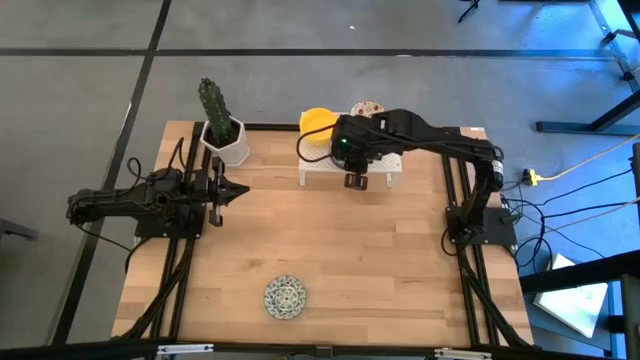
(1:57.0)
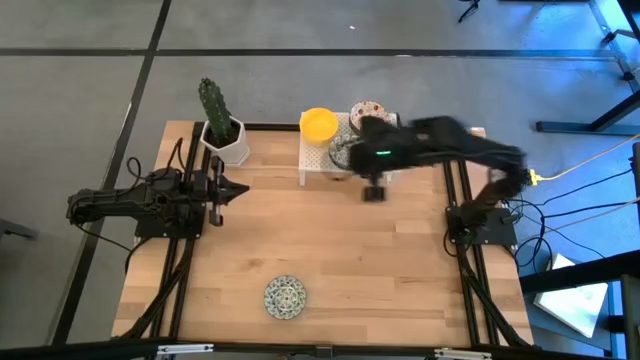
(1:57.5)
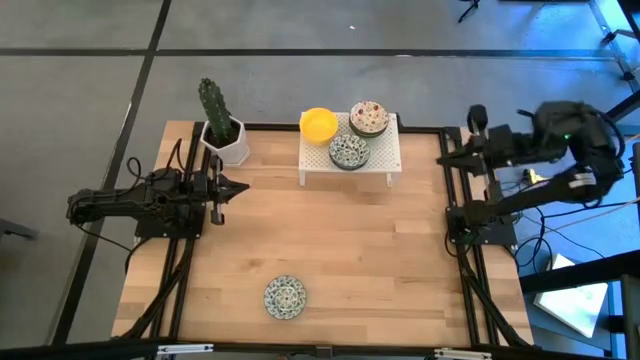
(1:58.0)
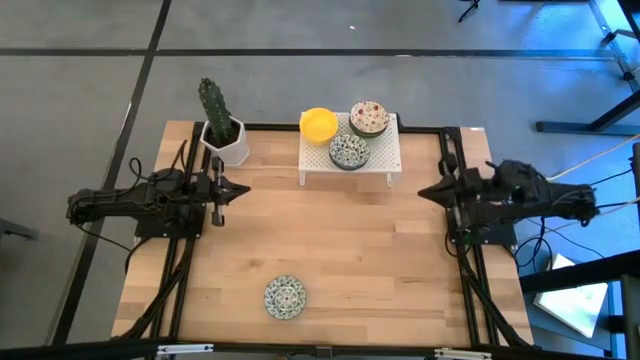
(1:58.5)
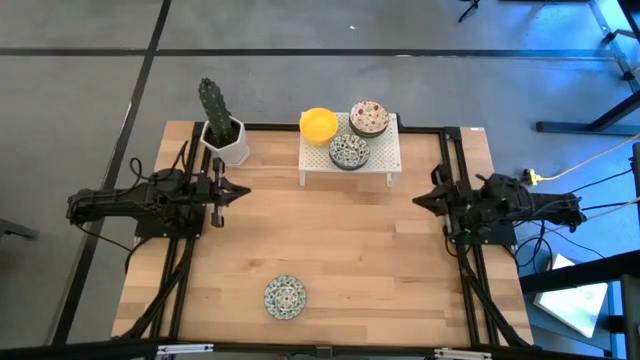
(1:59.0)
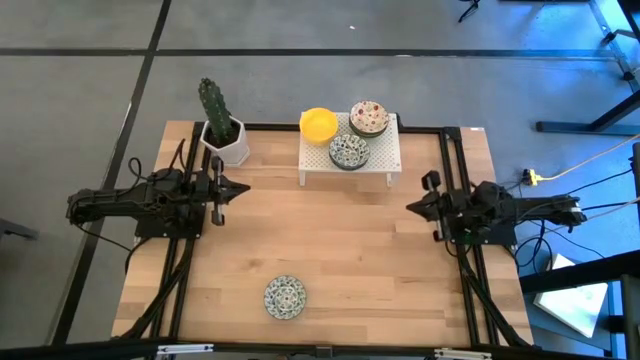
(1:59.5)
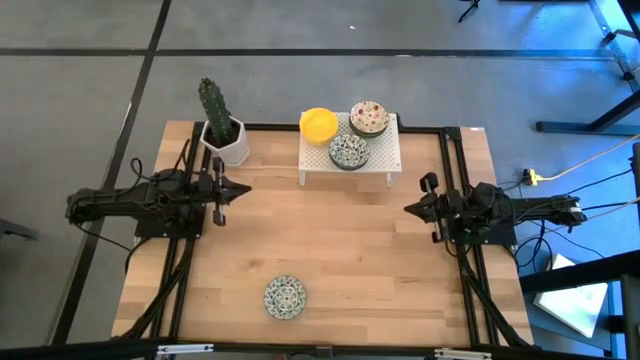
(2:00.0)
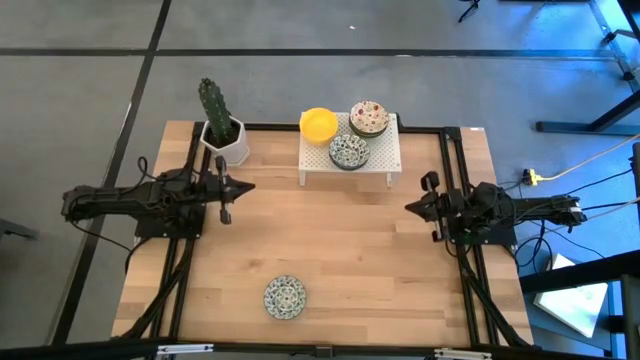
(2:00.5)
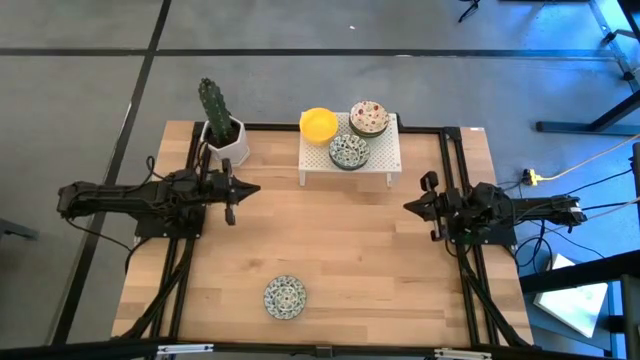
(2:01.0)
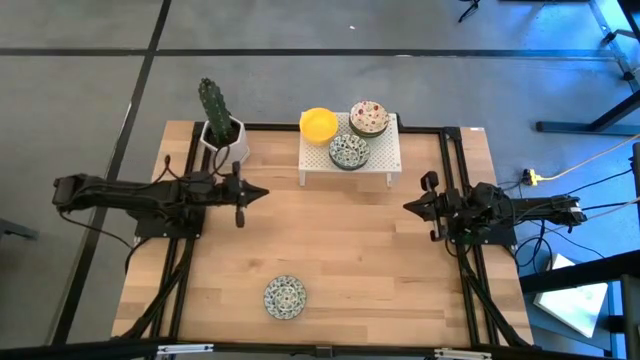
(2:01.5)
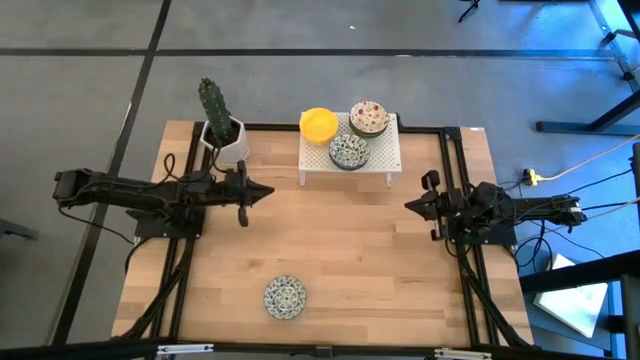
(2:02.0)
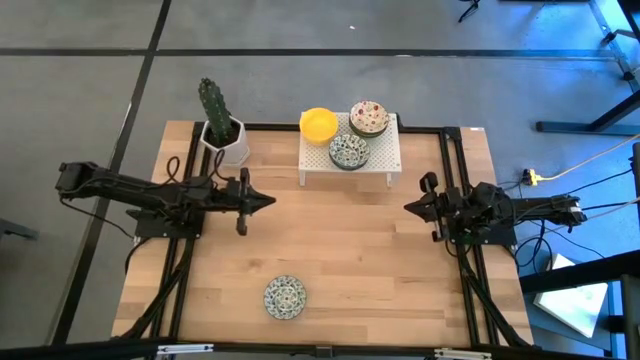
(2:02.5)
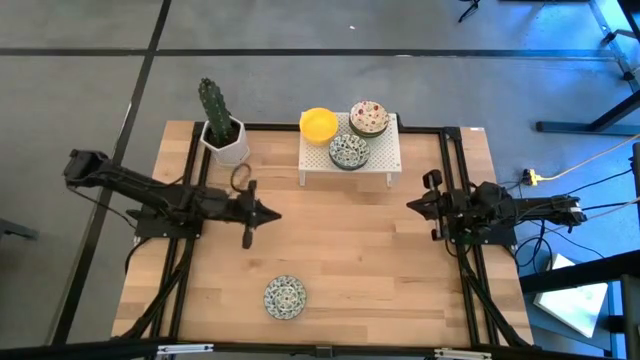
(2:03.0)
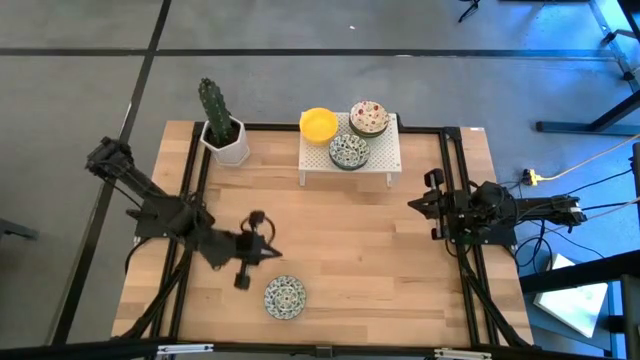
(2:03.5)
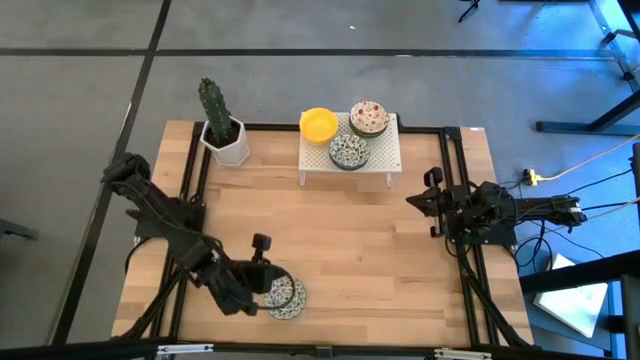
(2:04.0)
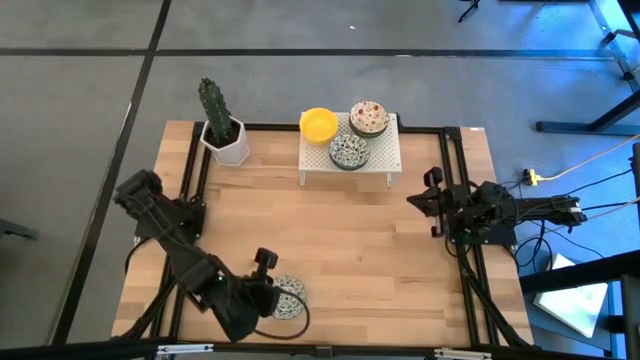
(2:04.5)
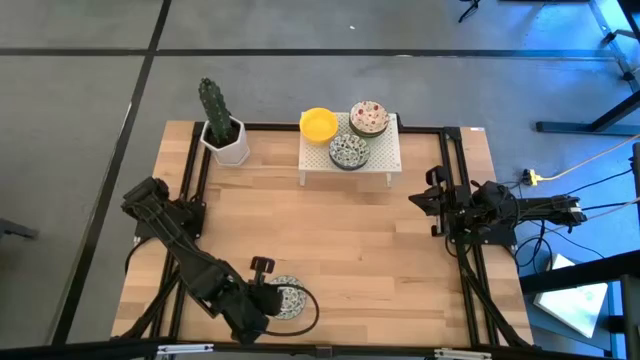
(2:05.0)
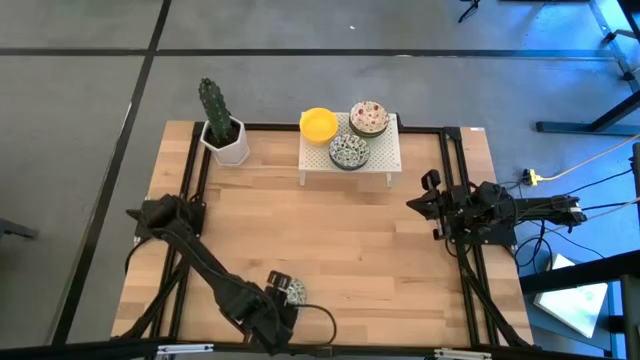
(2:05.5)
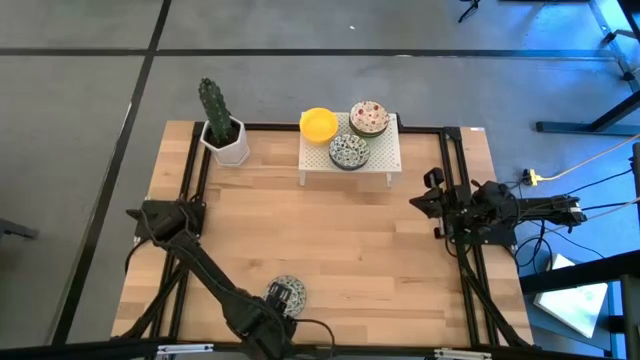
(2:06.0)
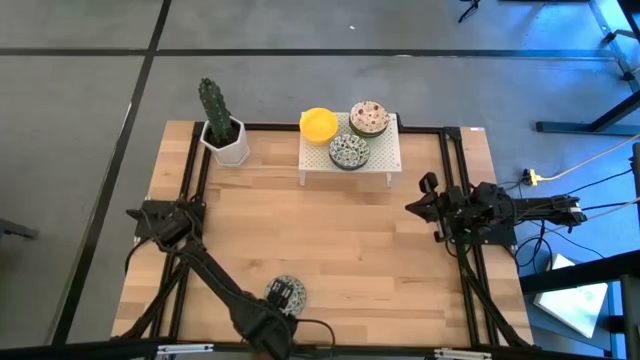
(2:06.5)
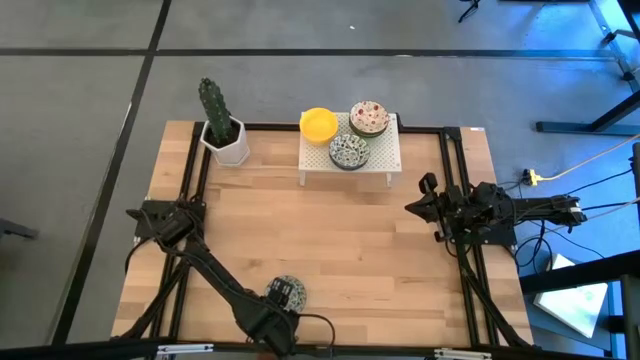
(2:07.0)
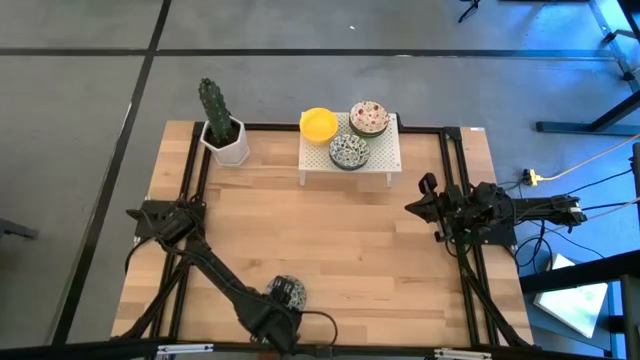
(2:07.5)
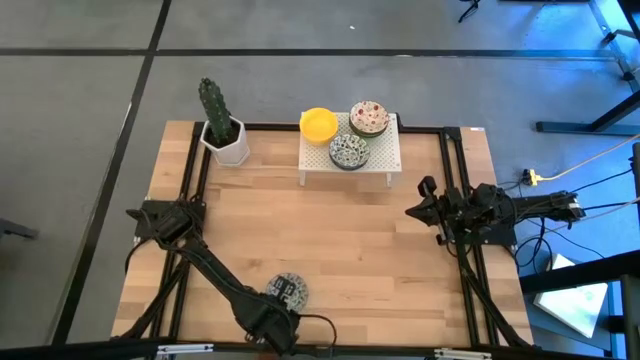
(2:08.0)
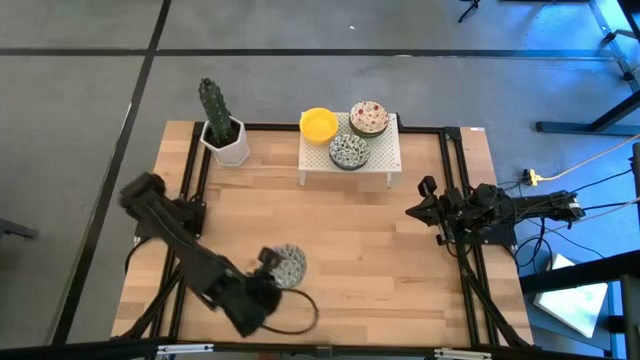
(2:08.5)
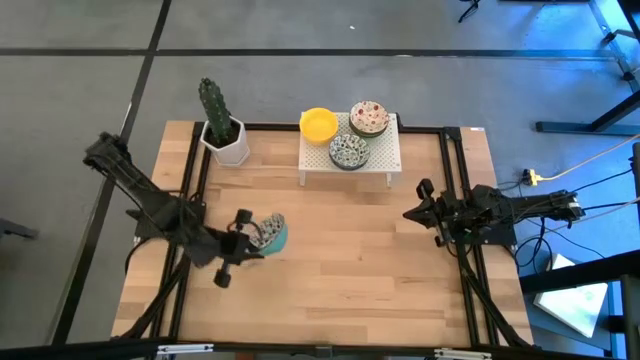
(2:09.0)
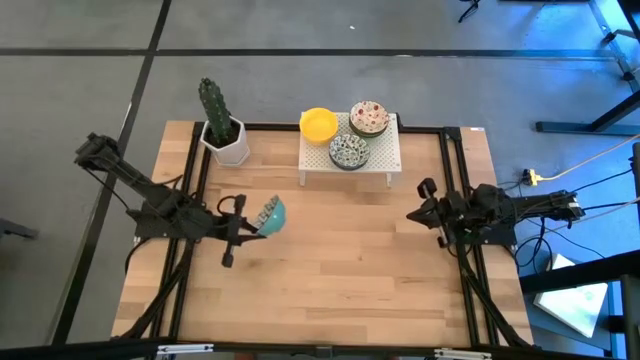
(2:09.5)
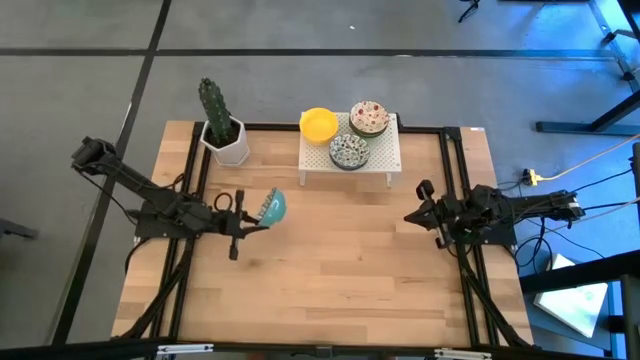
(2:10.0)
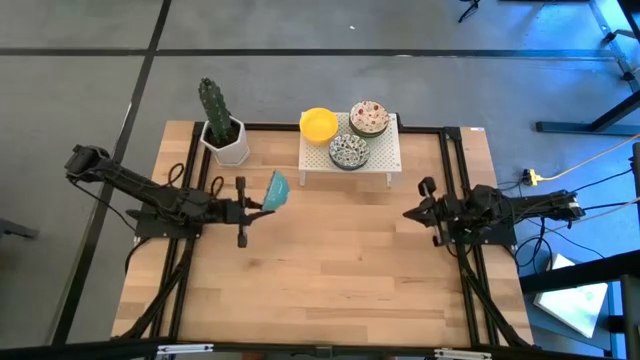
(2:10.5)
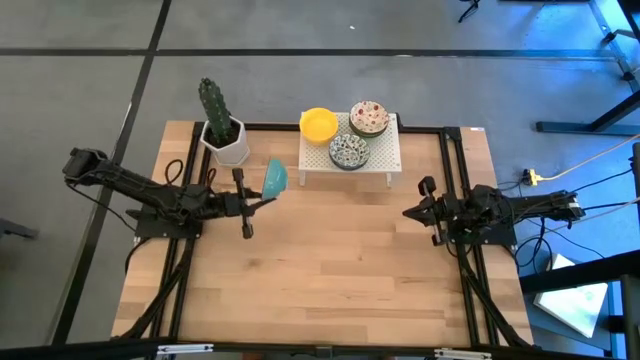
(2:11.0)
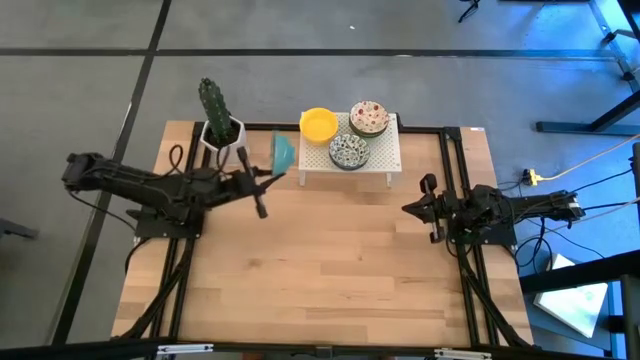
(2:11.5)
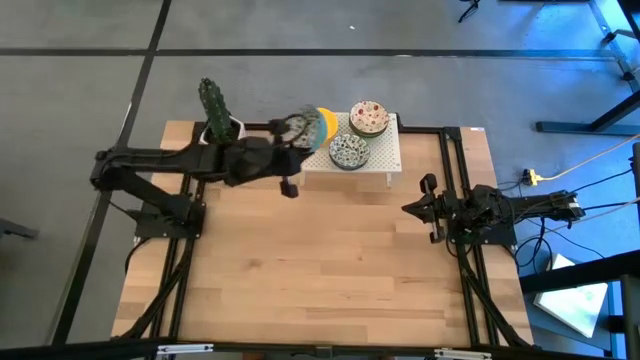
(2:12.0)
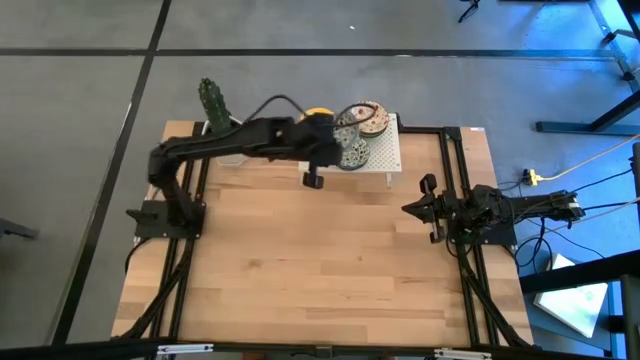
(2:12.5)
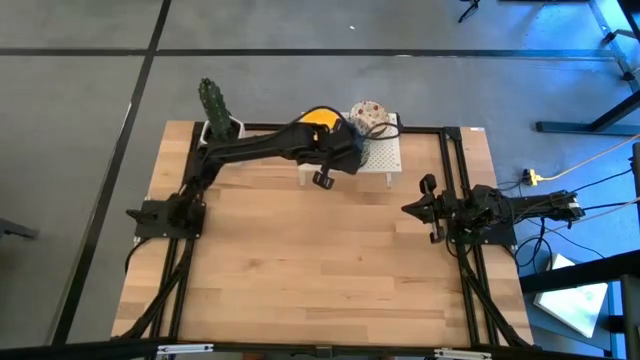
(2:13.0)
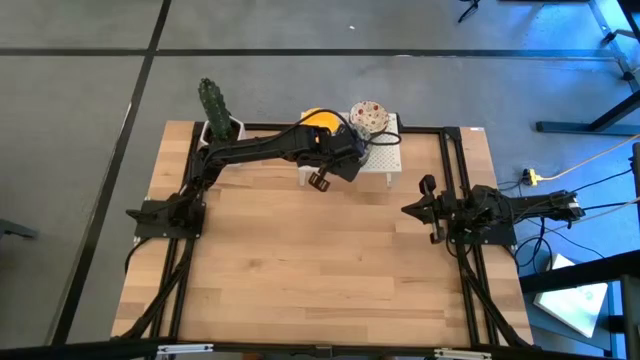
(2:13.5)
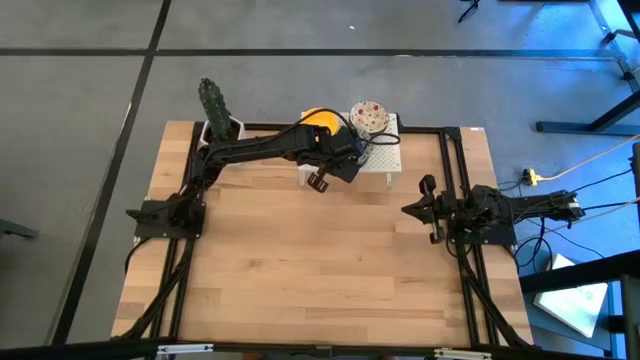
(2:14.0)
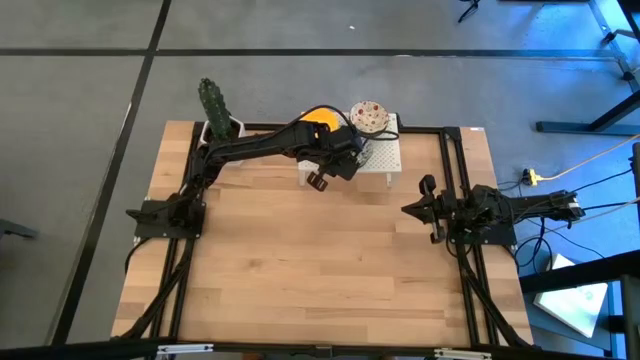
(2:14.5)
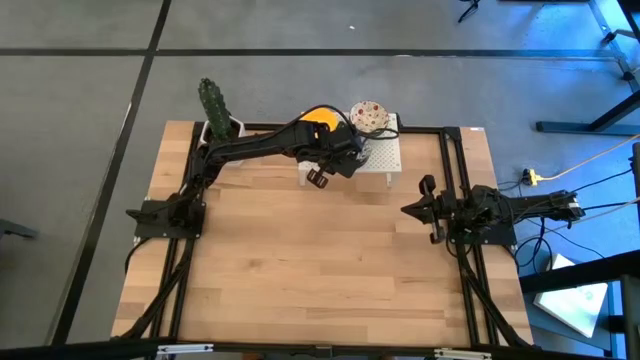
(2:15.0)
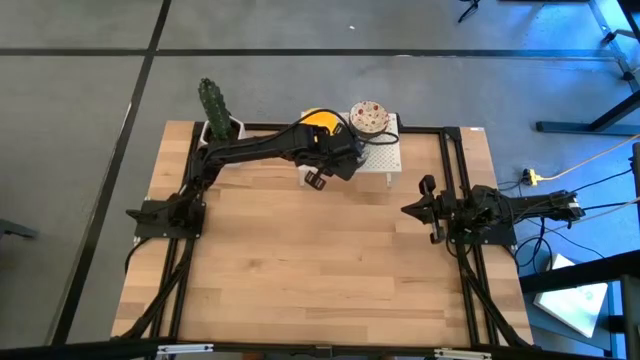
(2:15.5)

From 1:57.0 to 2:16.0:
Task: Pick & Place Mini bowls
Stack the blue bowl on top of the blue bowl on the shelf

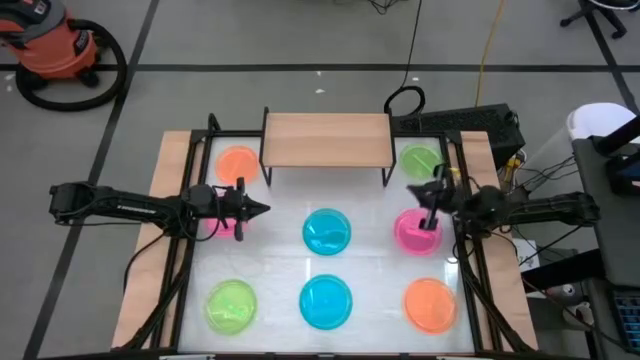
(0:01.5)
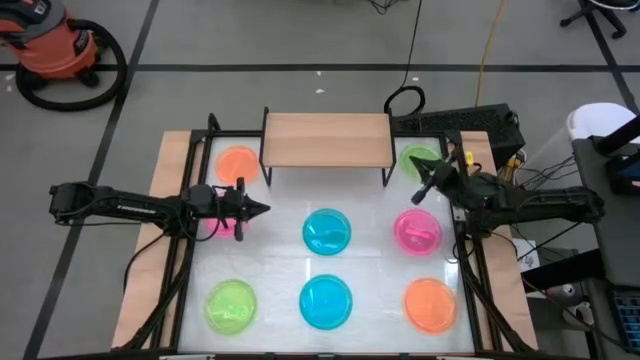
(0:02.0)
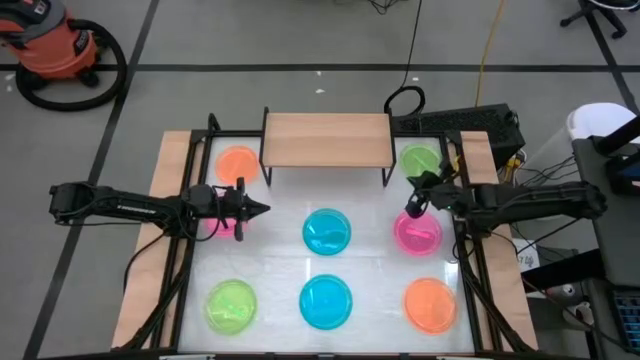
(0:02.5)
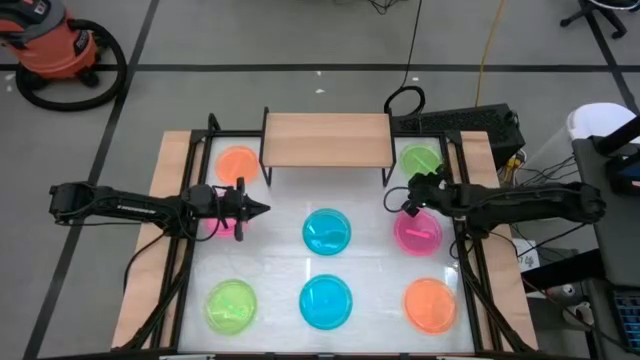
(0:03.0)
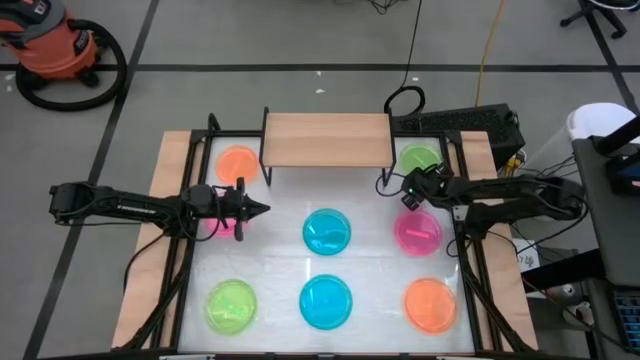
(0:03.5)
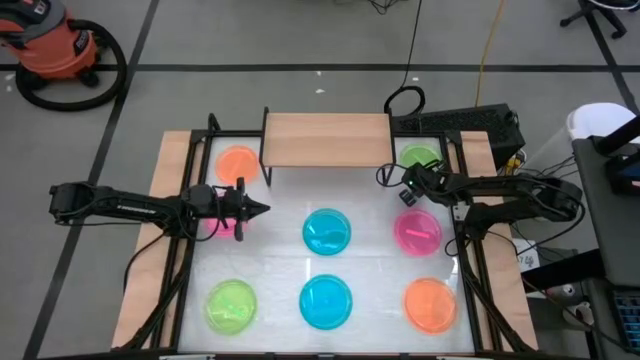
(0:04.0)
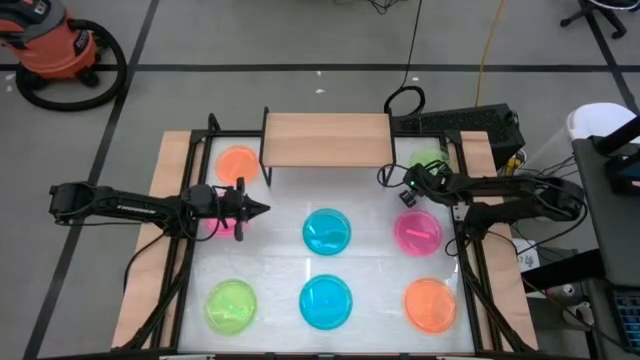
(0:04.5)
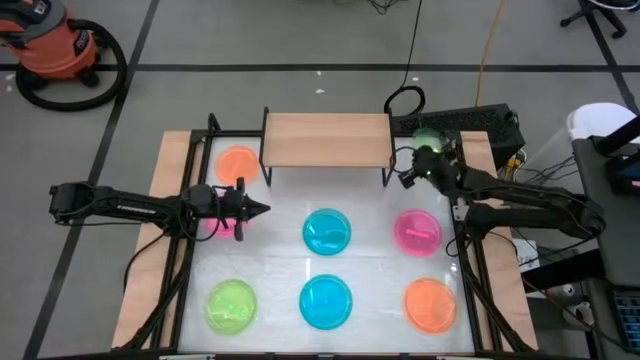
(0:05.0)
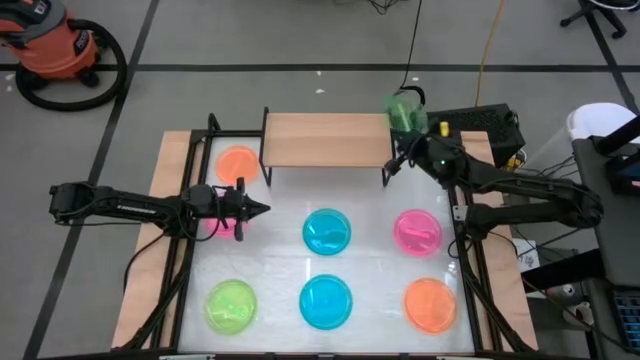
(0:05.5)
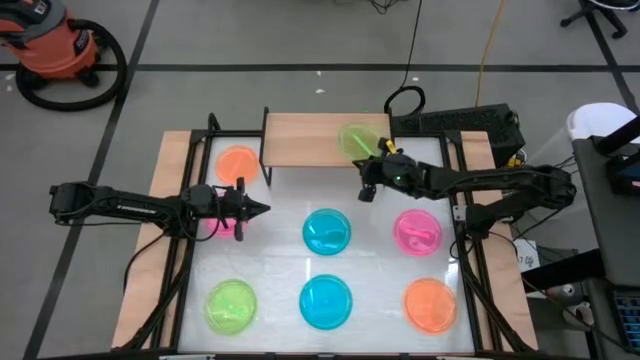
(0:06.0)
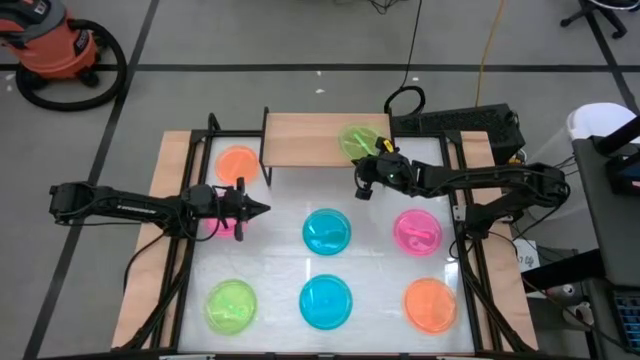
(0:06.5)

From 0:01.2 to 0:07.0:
Task: Place and stack plates onto a shelf
Put the top green plate on the shelf
